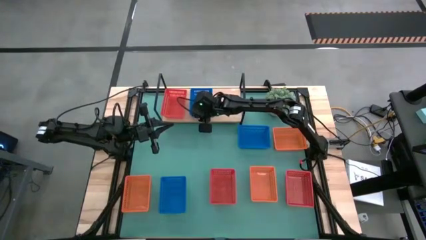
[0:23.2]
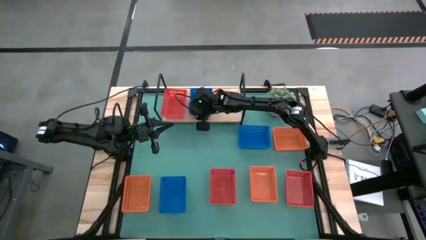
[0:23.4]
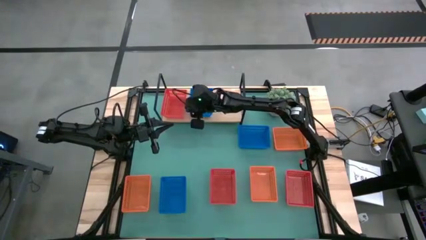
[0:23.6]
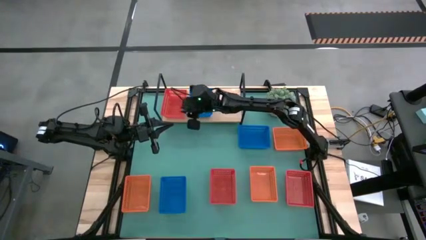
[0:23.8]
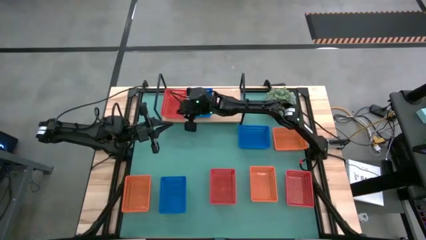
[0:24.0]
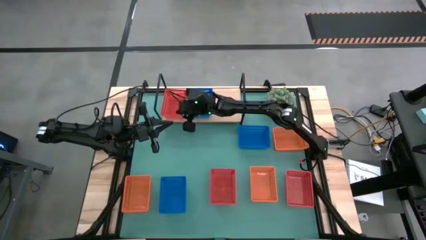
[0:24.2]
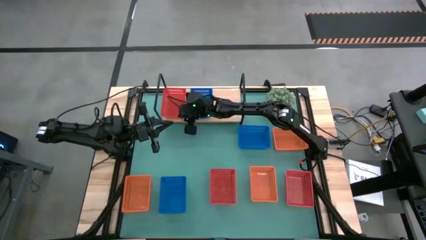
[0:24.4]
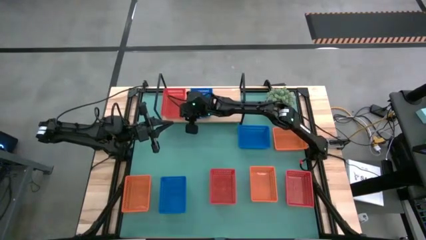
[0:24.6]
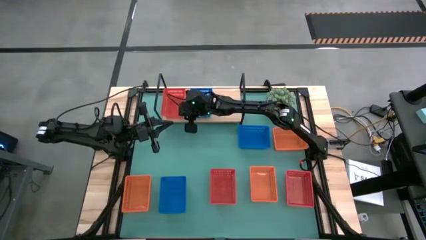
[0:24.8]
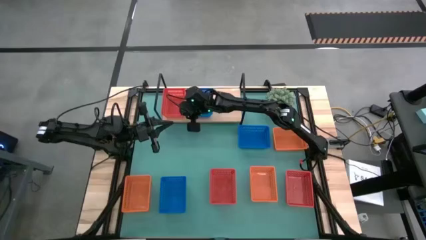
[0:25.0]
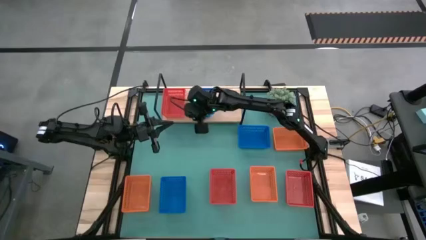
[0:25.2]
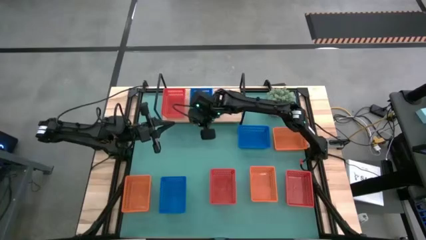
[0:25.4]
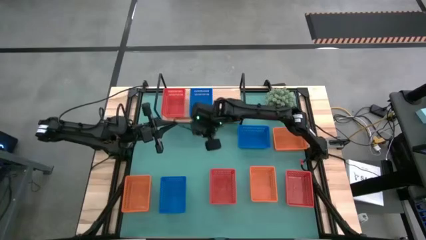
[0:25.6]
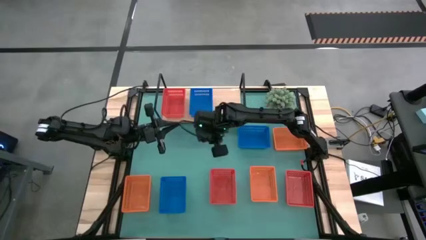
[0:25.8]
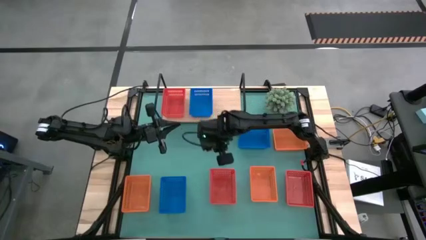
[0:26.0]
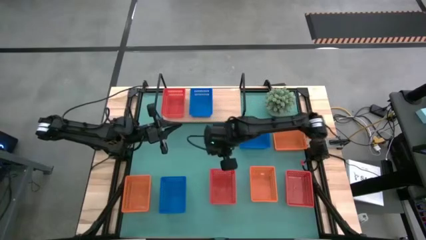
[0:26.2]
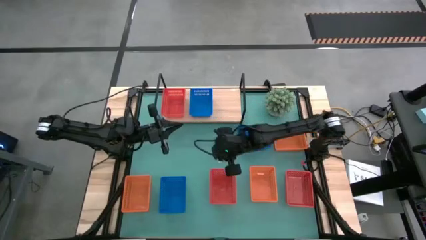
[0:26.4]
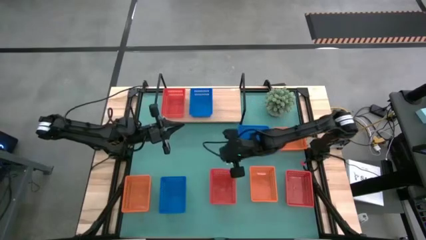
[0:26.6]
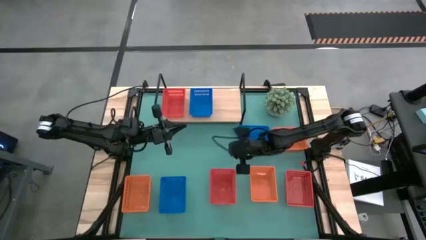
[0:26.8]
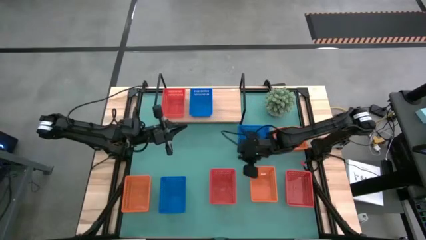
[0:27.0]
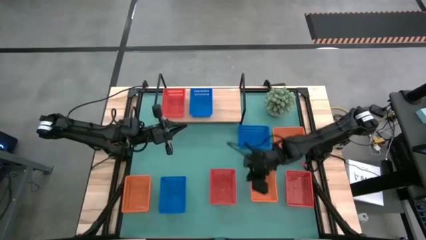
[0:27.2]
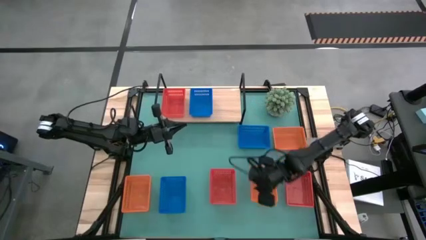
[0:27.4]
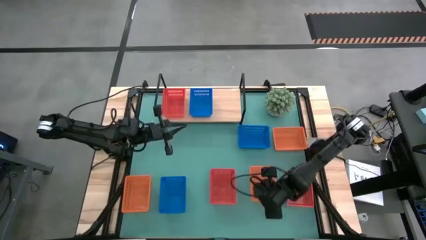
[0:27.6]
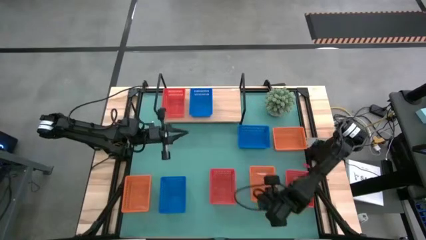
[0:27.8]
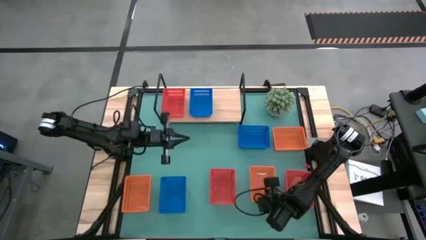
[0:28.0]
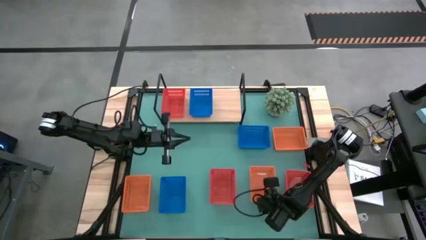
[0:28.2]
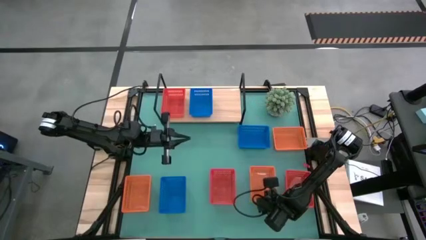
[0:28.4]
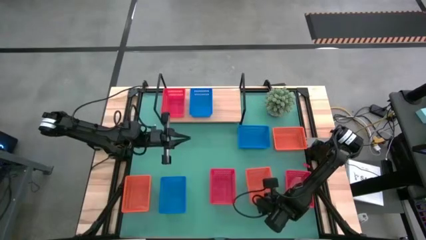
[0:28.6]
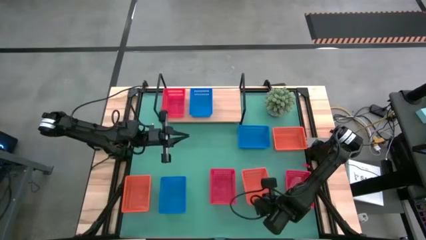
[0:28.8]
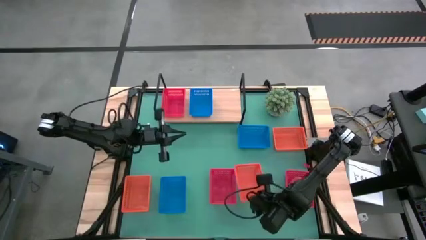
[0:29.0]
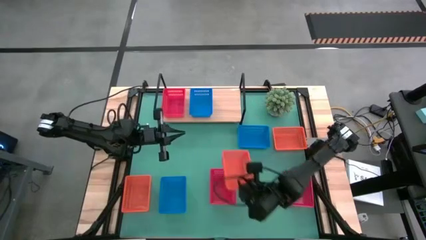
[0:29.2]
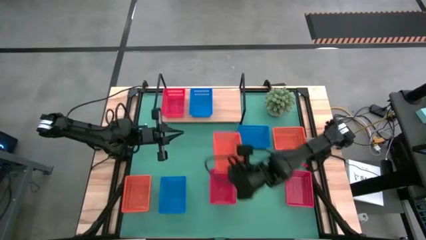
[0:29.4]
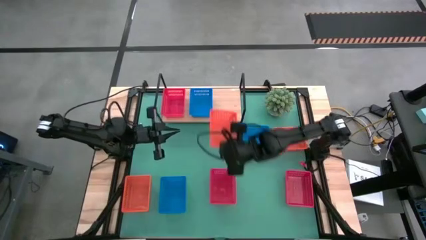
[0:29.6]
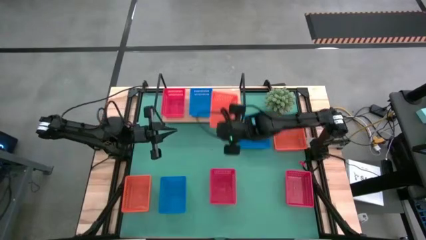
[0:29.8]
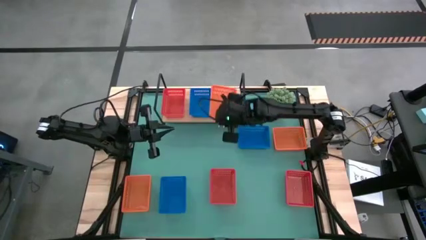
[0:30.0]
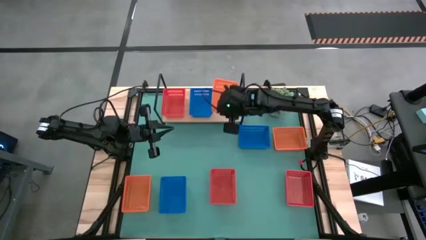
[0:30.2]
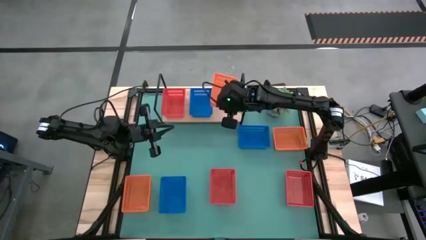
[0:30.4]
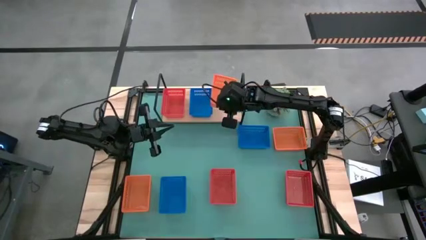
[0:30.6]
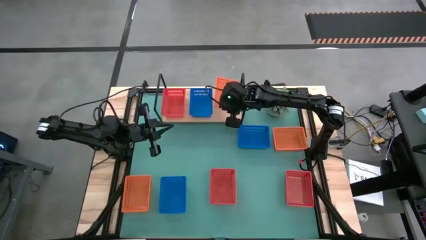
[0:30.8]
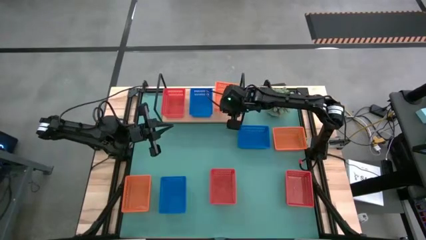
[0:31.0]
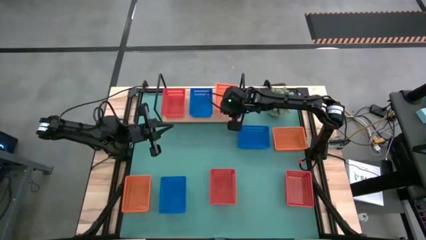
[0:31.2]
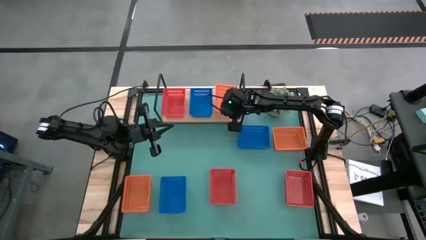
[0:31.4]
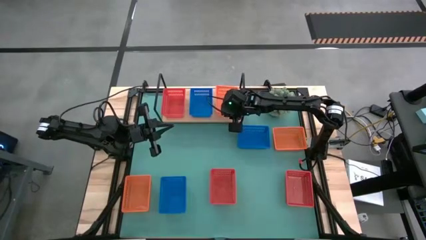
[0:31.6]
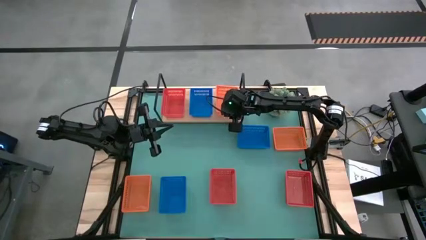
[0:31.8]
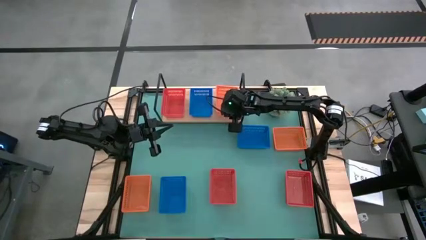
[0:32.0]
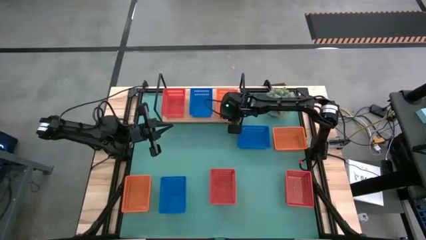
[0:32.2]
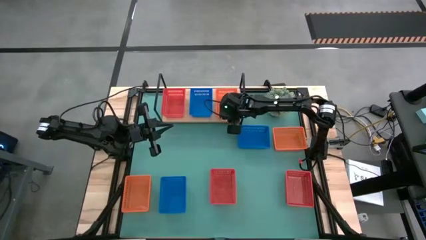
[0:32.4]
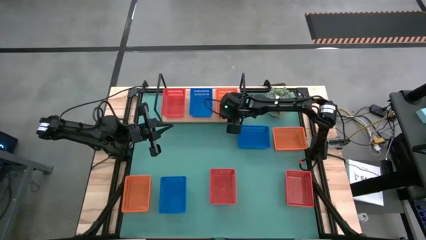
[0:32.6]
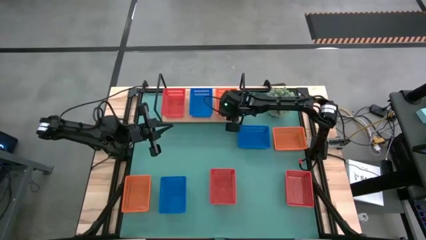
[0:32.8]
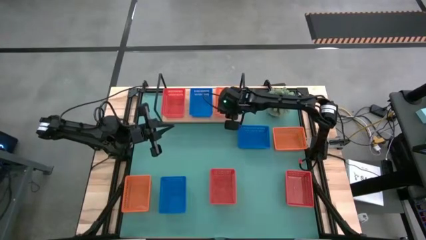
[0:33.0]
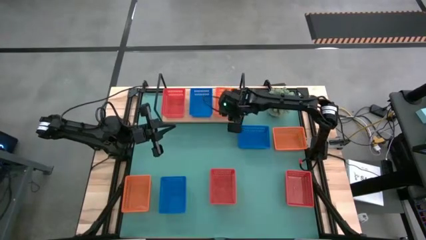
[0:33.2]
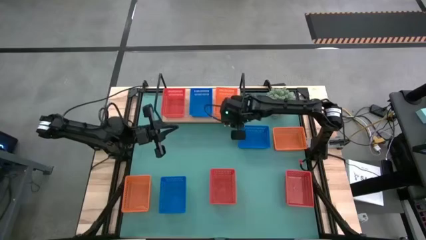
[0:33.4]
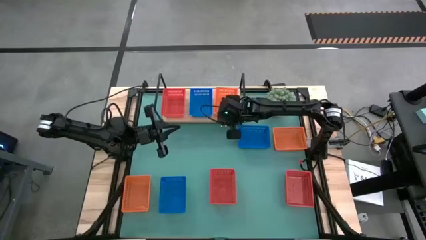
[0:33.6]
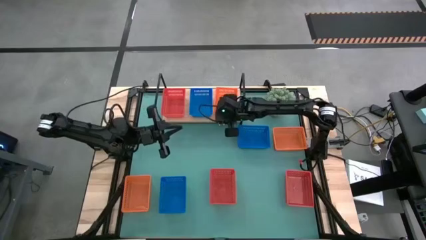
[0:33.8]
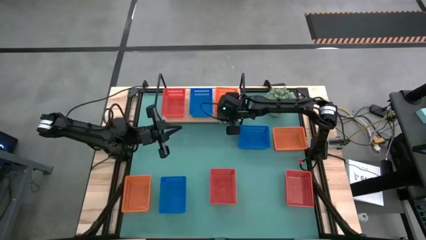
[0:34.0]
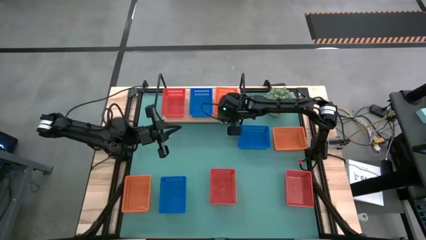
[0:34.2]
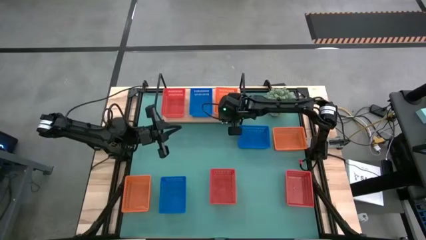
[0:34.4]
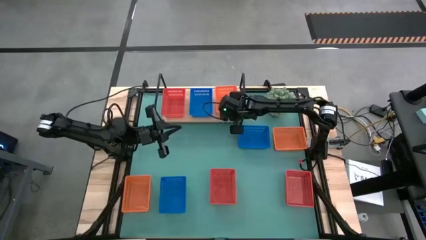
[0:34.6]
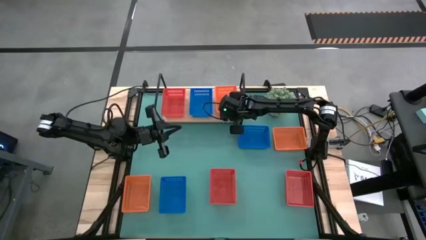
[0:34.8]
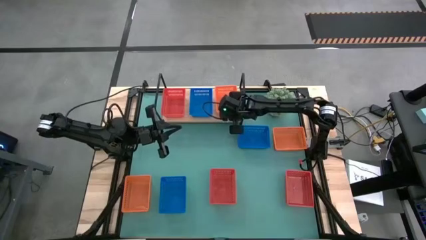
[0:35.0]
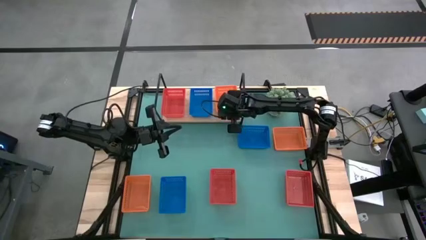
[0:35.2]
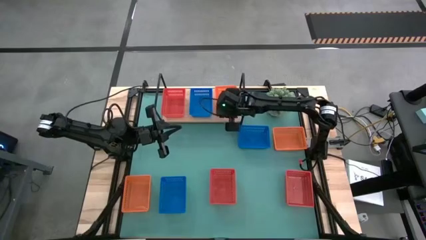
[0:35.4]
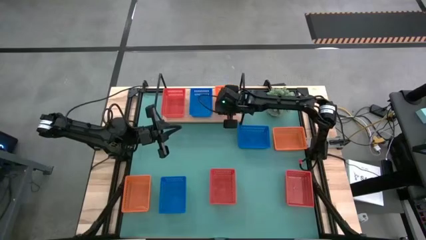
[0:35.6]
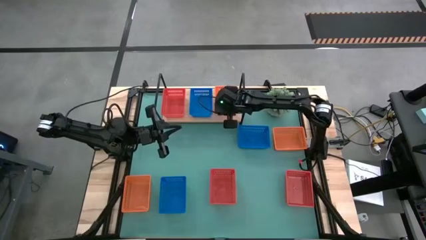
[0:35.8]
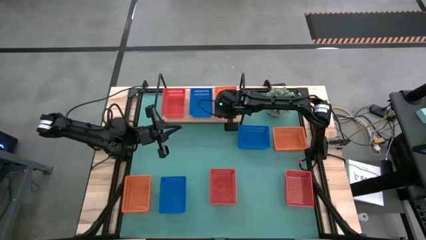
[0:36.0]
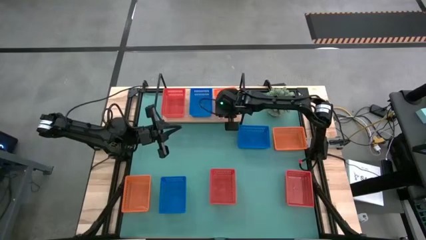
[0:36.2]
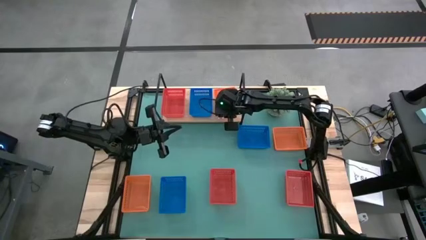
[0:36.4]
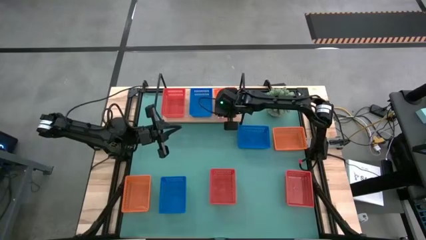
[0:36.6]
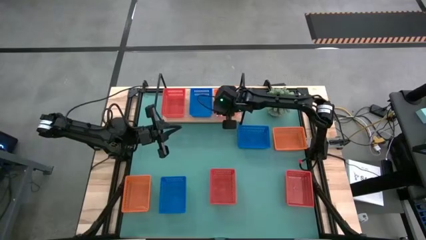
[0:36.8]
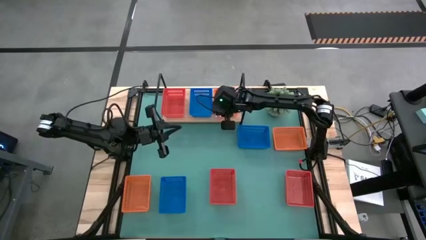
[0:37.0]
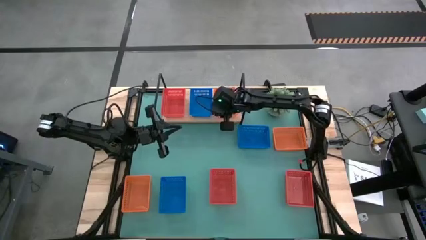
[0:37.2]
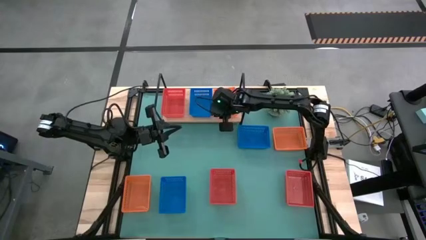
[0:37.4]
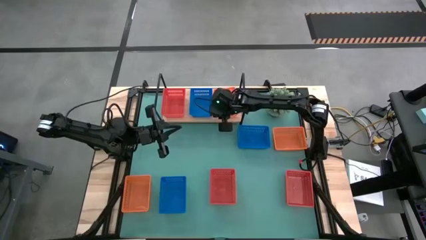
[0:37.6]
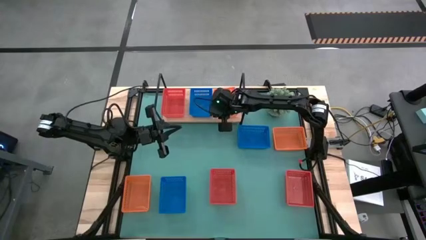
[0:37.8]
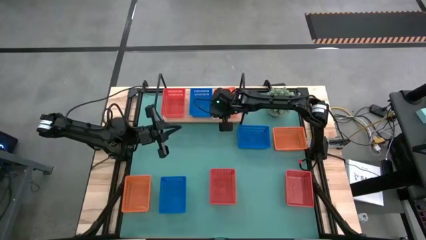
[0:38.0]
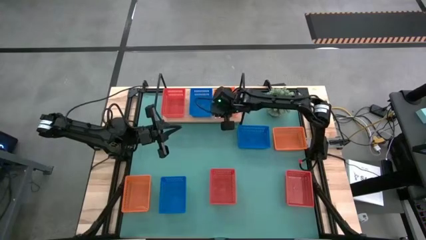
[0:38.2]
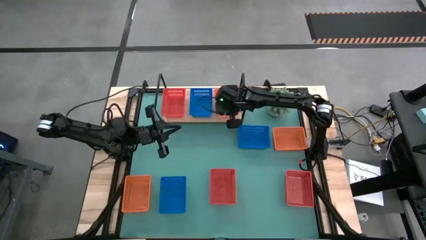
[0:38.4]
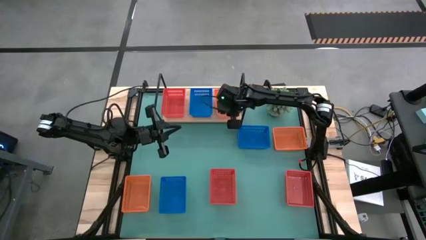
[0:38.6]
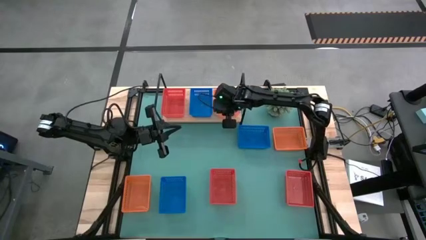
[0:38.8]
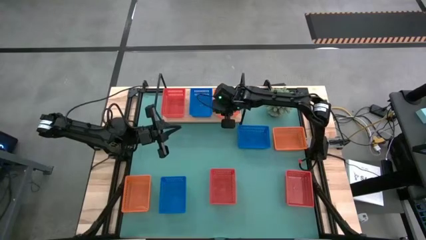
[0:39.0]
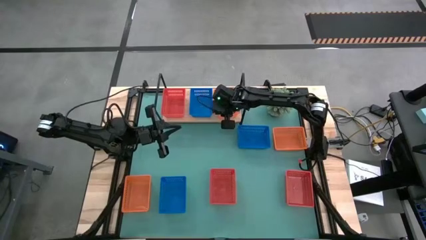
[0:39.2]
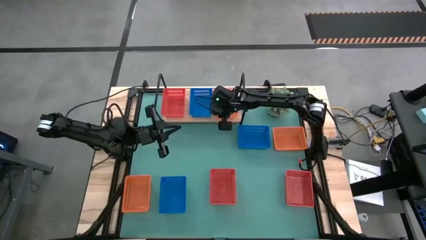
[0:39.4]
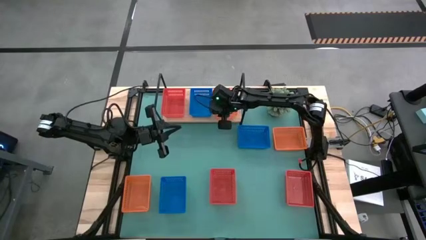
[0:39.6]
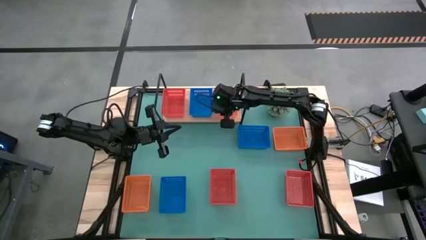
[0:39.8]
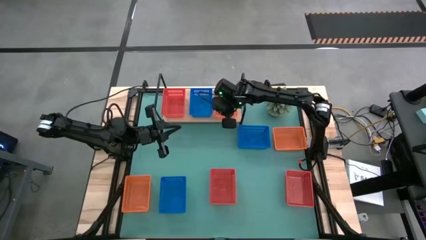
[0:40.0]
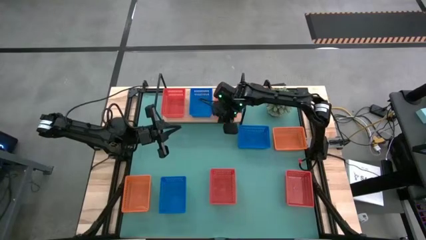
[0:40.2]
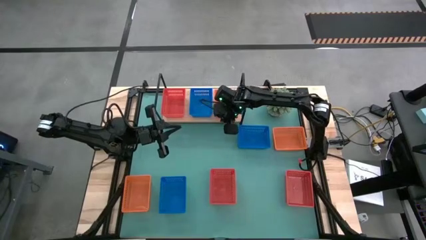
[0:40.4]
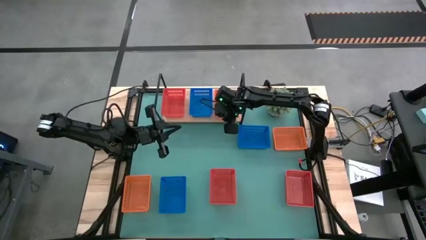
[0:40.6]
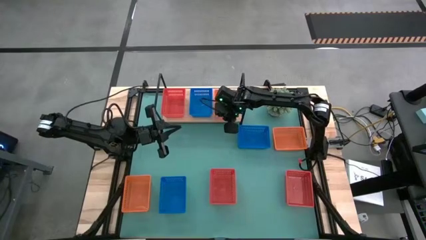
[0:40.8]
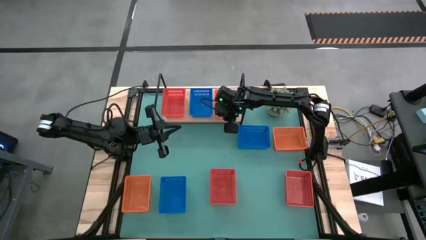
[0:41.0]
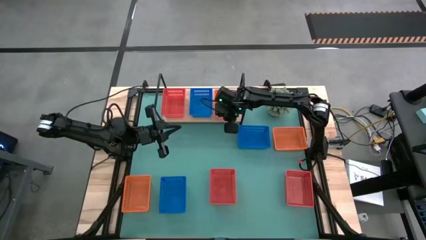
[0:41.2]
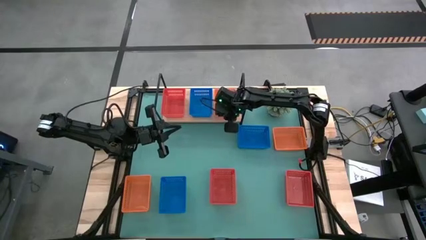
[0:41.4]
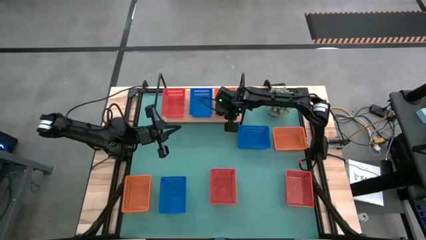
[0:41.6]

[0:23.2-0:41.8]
Task: Stack baskets on shelf by color
Put the bottom right orange bin on the shelf
